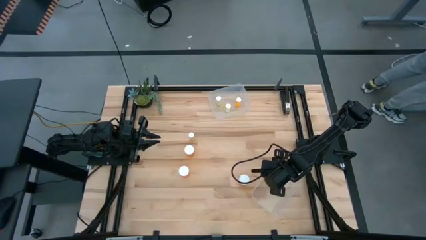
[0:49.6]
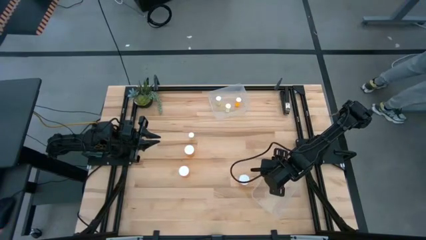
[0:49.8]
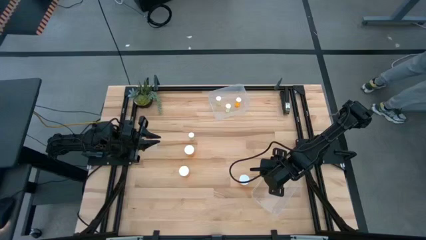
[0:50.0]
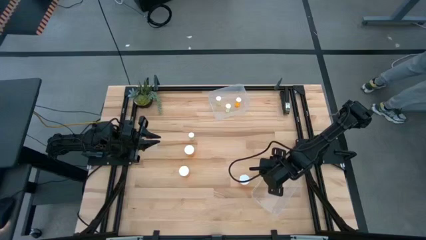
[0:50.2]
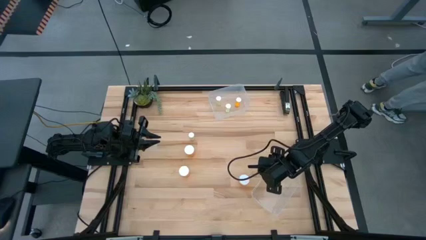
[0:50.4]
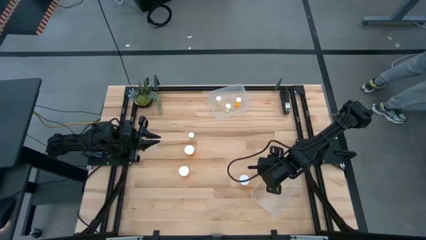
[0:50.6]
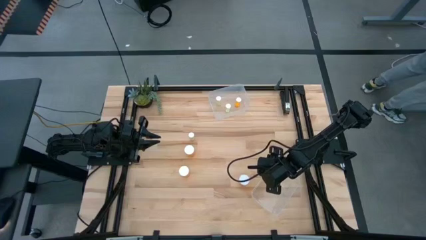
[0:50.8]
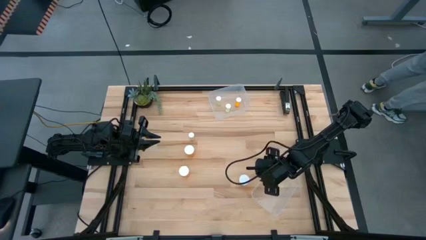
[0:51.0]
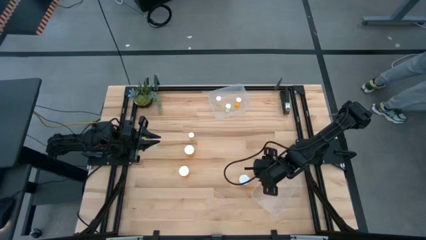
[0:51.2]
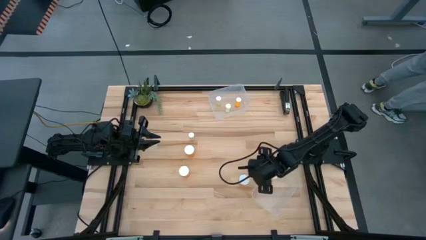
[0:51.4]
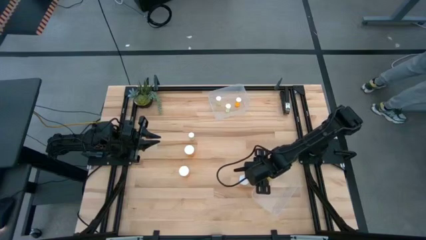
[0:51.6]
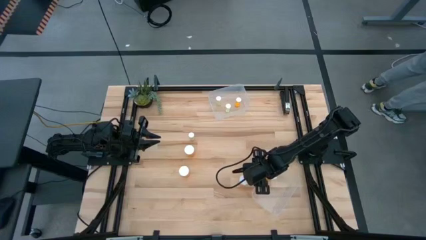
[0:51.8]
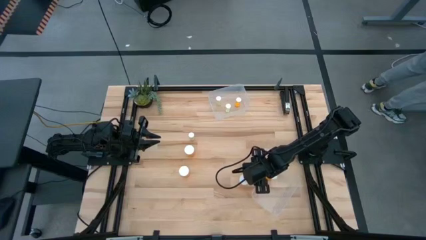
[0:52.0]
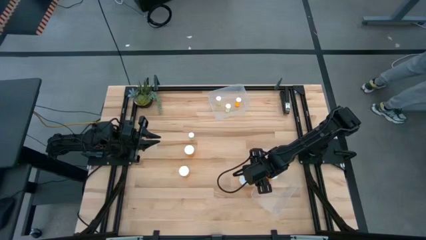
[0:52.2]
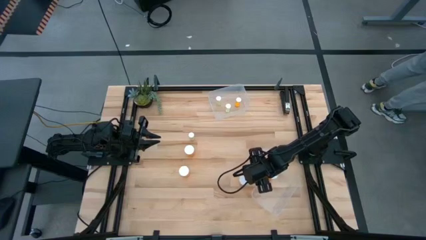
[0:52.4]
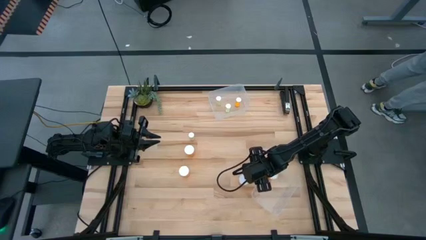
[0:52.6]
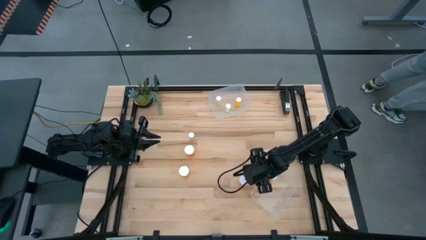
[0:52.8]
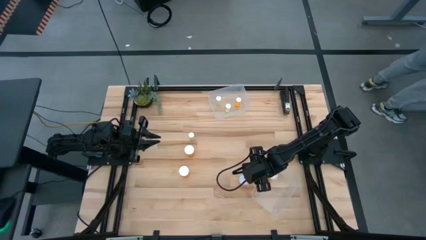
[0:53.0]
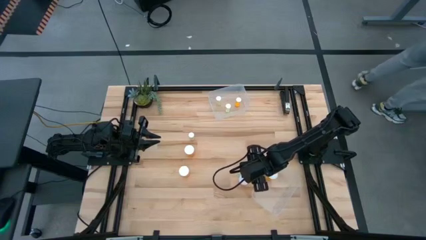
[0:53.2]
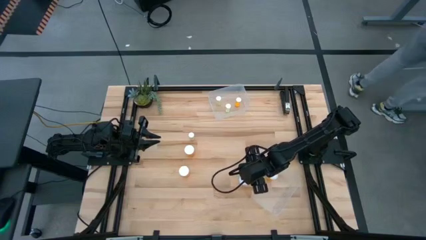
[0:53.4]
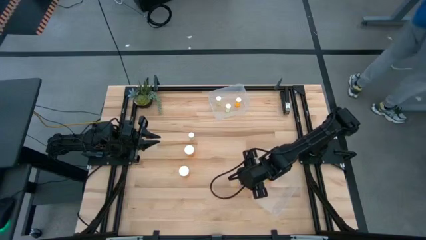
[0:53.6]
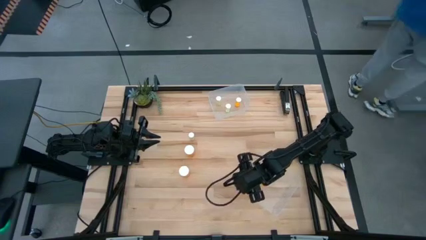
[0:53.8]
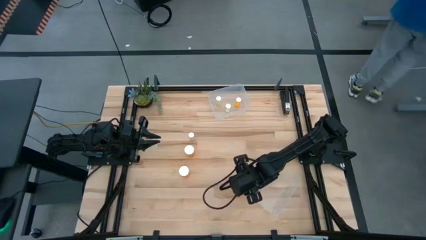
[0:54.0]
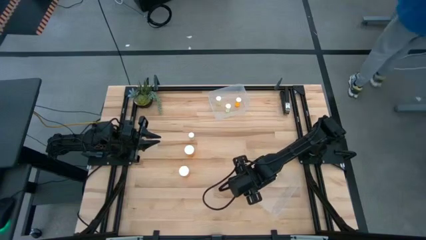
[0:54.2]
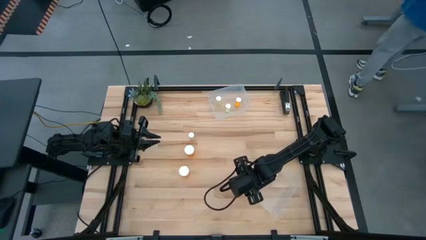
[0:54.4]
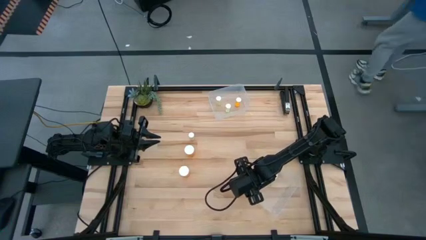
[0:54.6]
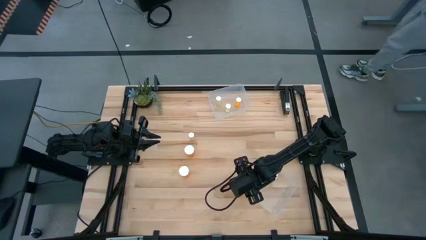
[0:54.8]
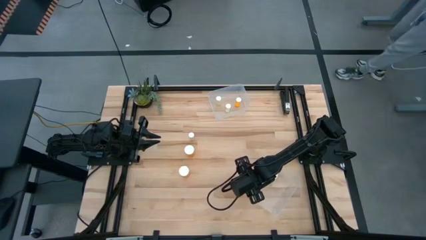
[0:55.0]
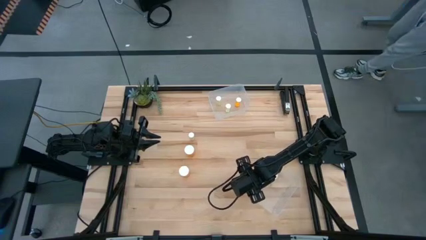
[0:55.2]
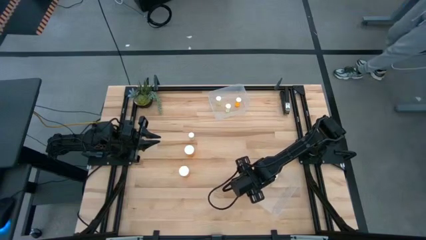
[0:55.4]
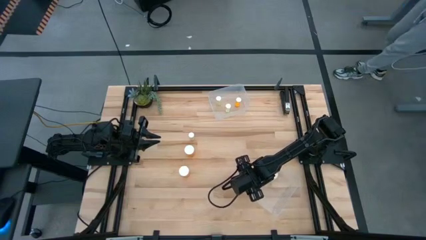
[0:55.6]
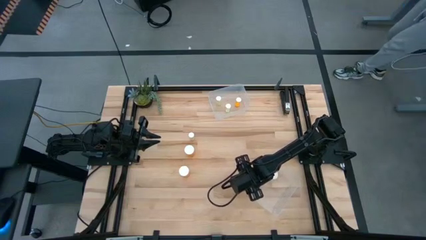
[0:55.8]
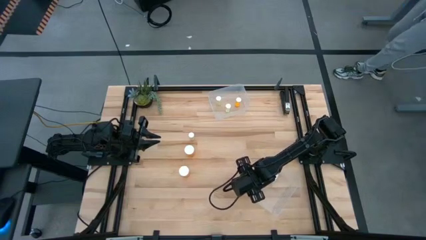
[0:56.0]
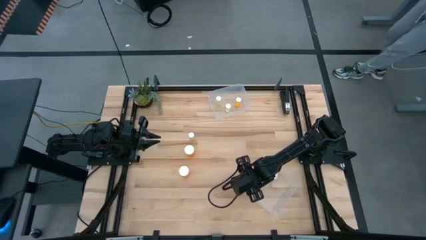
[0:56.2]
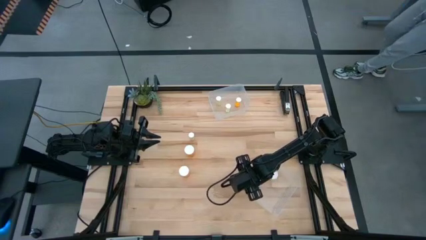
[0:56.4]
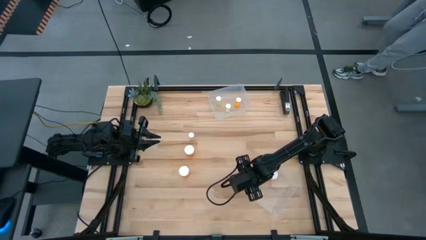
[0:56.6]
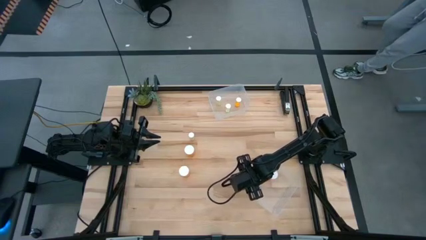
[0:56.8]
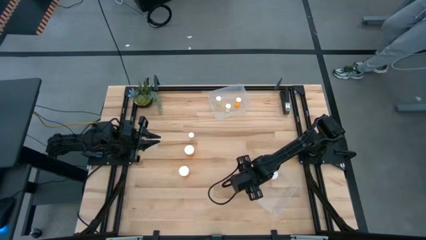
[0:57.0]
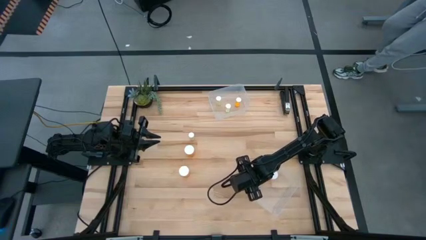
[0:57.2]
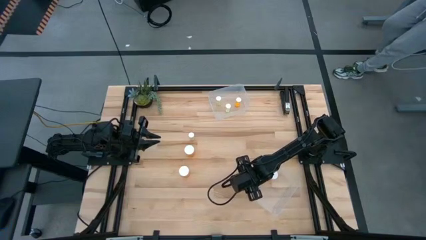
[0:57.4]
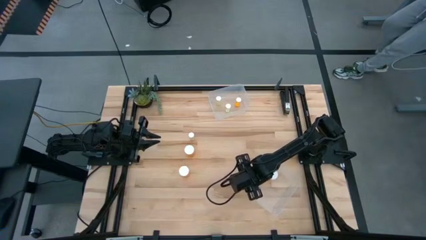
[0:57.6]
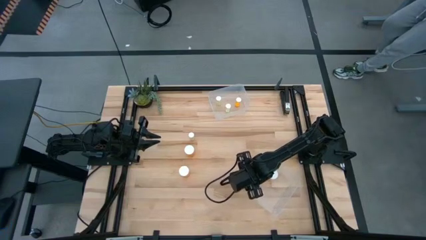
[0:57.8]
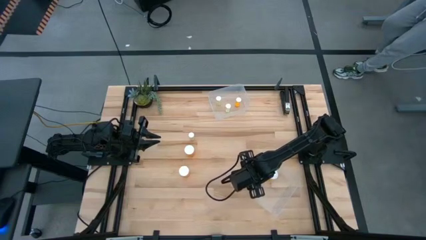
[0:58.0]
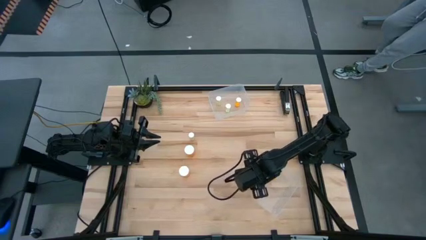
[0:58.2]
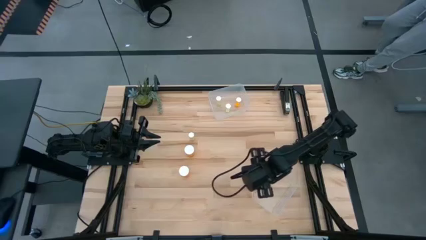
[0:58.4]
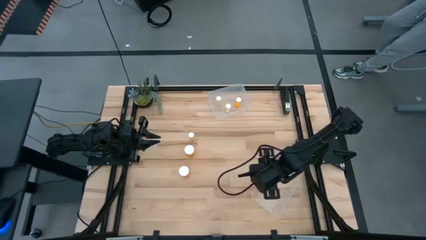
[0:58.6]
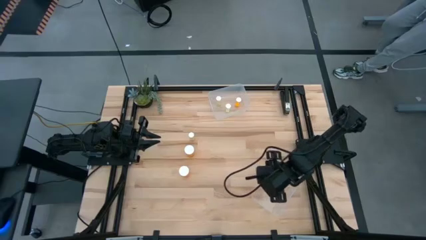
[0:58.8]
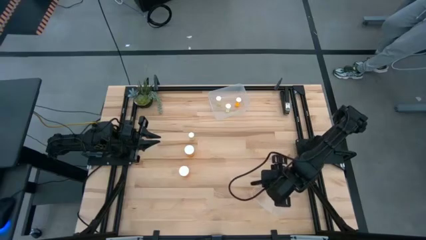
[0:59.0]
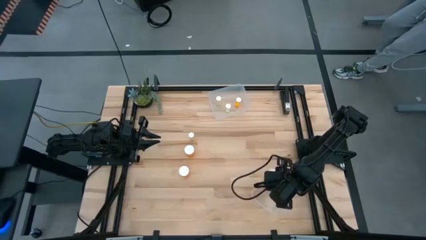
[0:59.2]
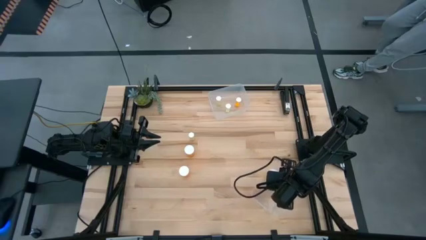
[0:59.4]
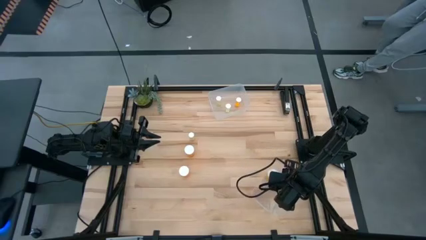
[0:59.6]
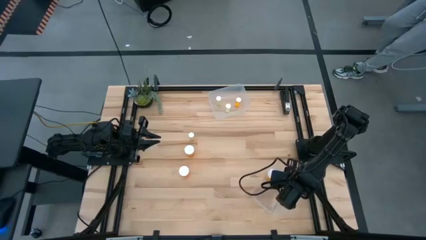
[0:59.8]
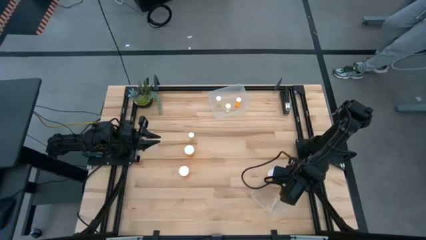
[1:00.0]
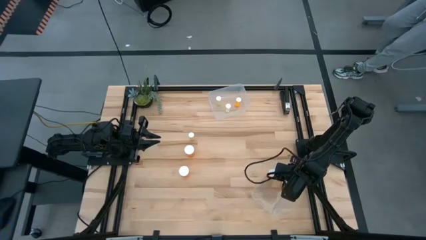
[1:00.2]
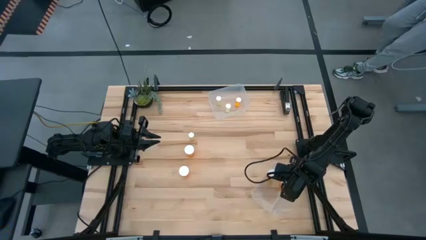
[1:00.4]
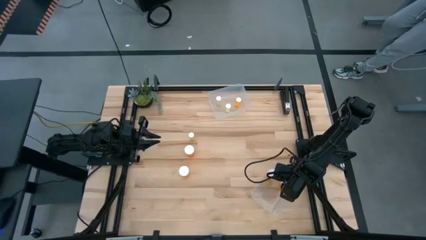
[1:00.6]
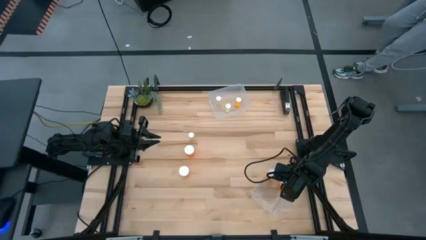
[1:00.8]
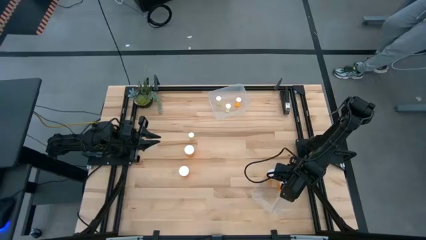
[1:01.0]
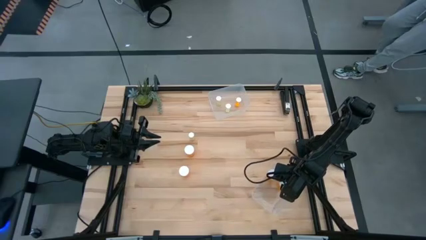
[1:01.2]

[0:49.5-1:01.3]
Task: Pick and place medicine bottles into bin by pill shape (circle, oval)
Put the large orange pill bottle into the bottom transparent bin

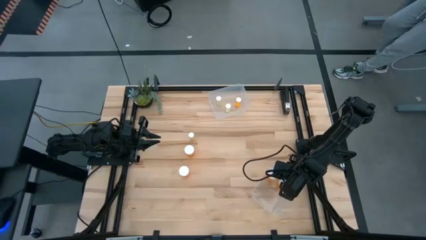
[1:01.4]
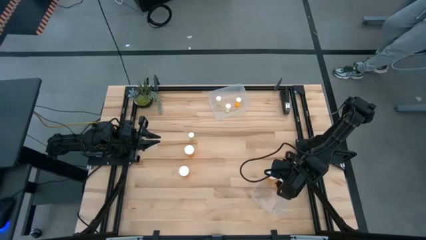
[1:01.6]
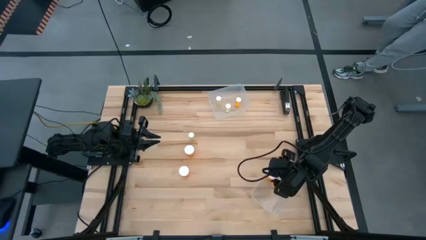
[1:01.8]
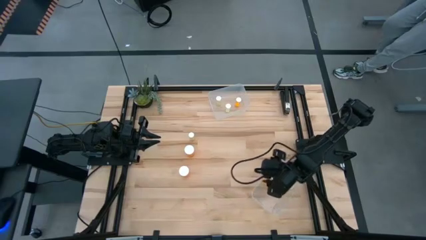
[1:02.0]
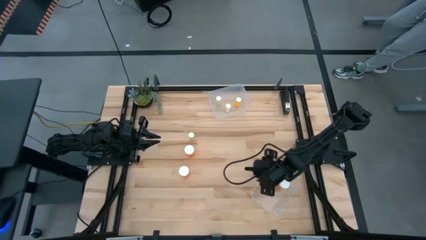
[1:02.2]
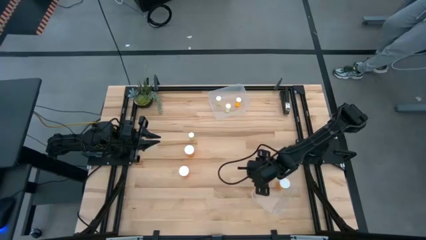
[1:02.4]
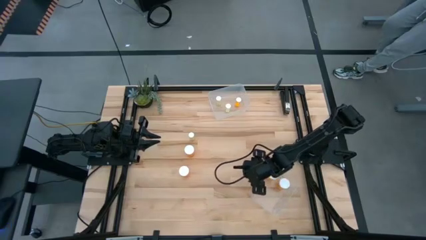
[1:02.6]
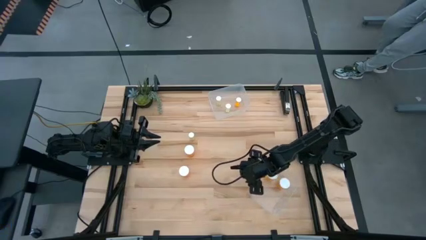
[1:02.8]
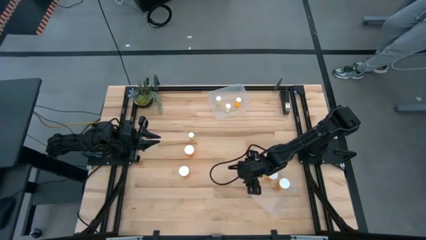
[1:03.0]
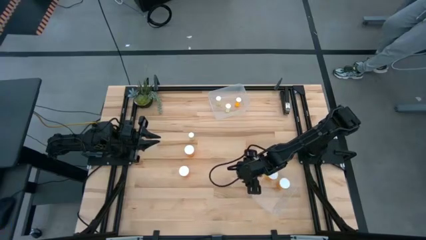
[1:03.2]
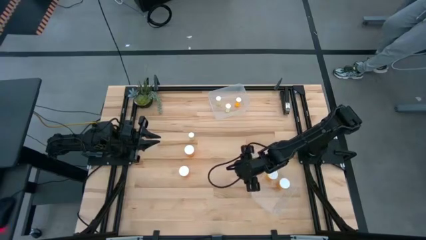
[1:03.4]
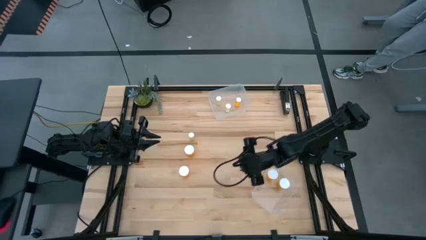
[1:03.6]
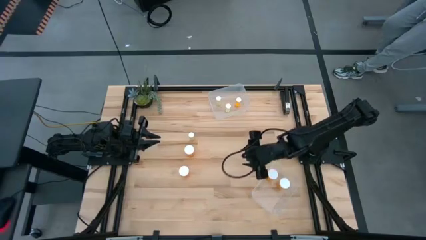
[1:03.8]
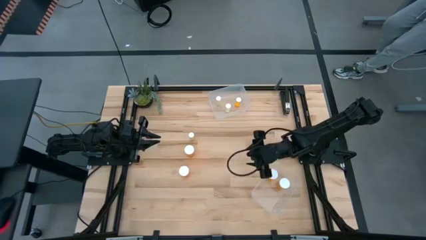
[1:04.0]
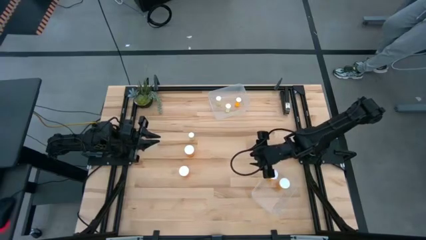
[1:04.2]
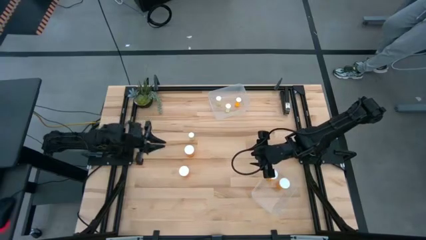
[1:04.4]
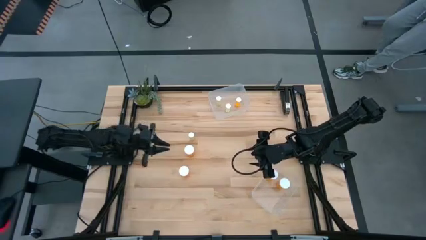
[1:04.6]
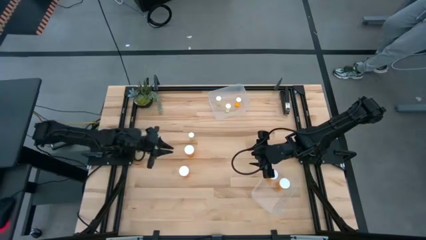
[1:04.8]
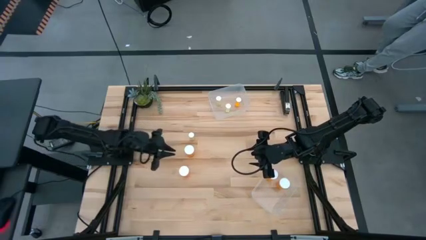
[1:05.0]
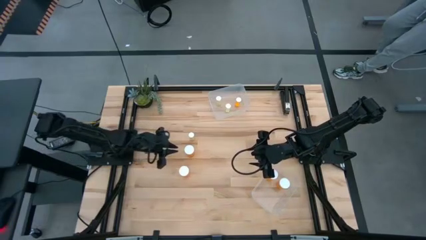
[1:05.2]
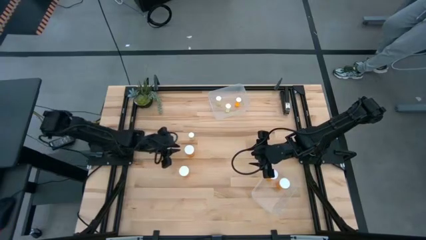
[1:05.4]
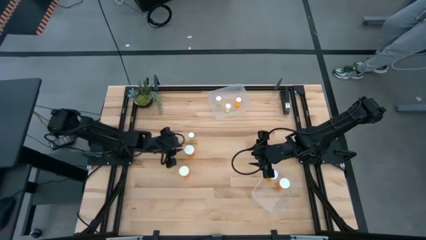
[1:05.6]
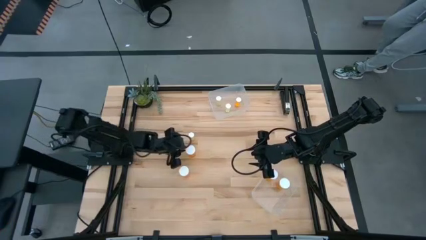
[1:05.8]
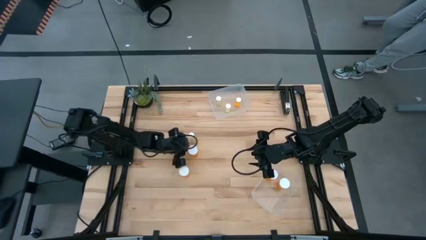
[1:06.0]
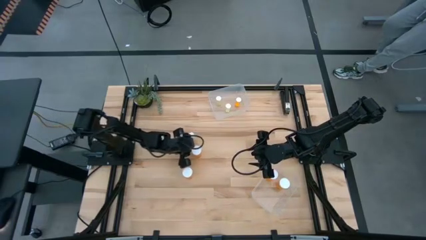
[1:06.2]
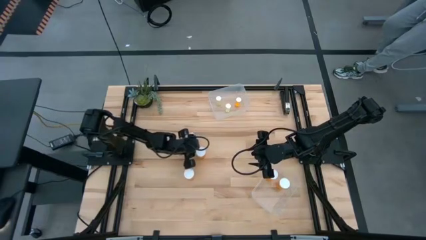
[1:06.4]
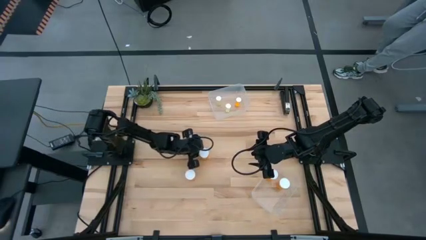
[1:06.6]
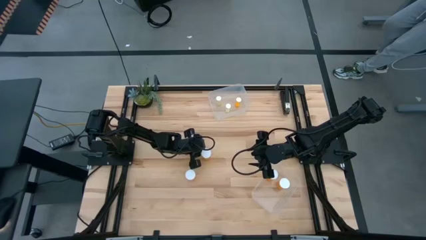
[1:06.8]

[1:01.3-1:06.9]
Move the orange pill bottle to the center of the table
